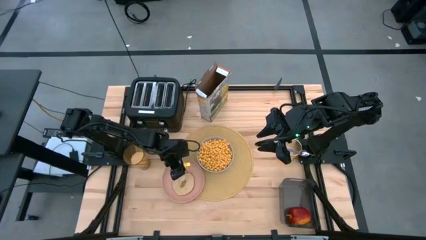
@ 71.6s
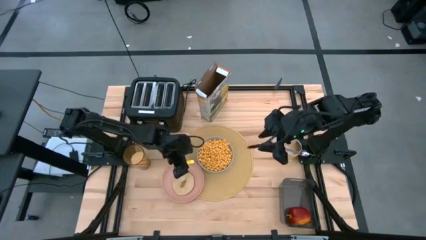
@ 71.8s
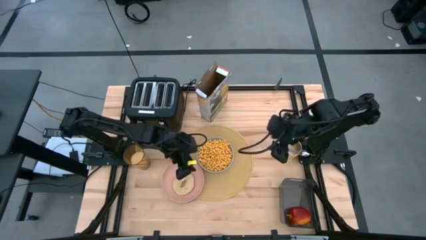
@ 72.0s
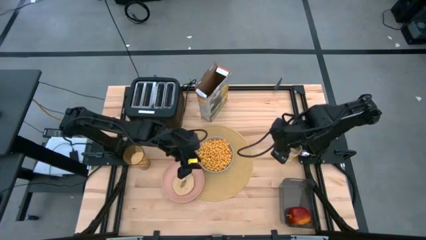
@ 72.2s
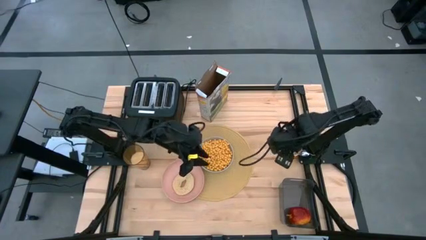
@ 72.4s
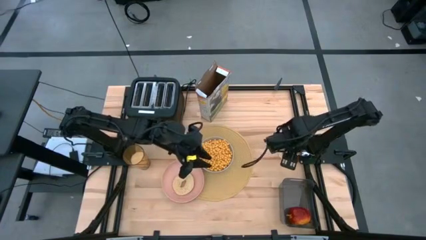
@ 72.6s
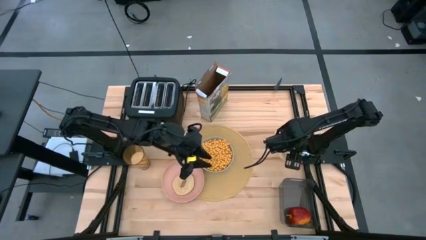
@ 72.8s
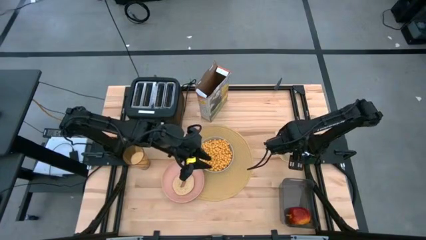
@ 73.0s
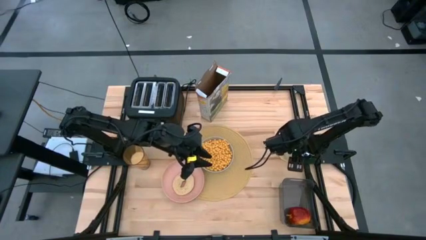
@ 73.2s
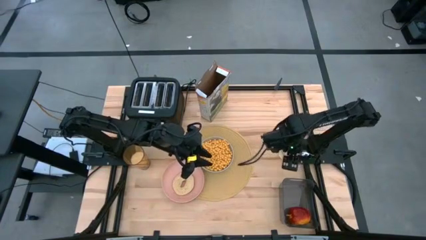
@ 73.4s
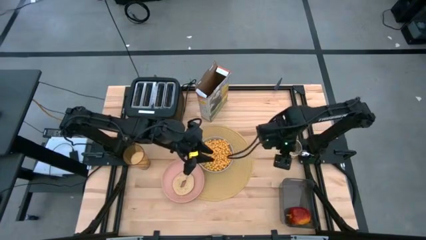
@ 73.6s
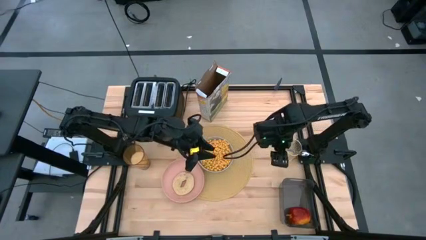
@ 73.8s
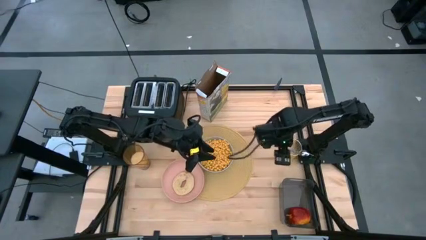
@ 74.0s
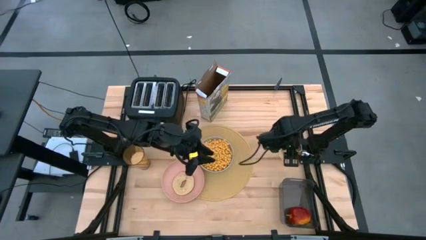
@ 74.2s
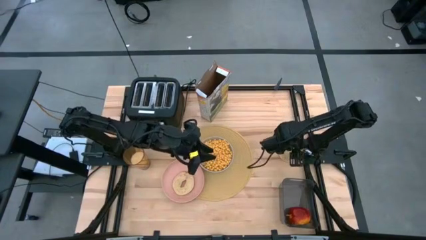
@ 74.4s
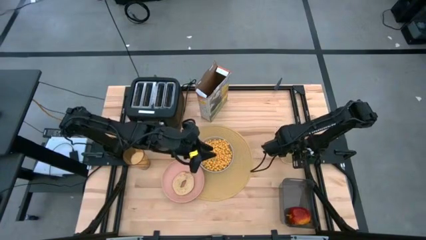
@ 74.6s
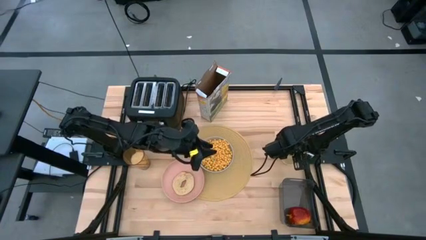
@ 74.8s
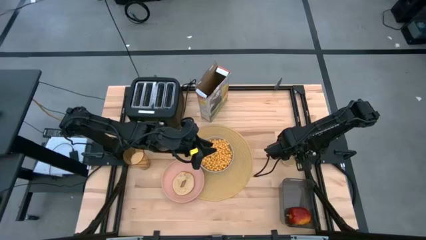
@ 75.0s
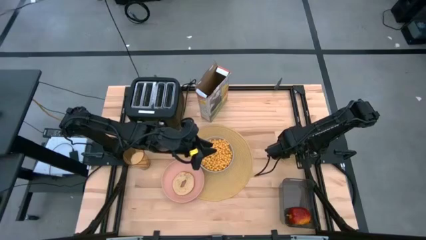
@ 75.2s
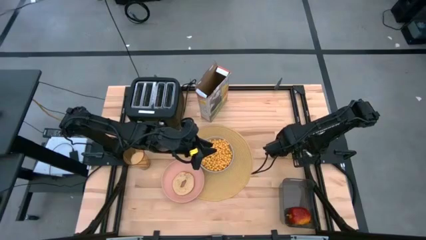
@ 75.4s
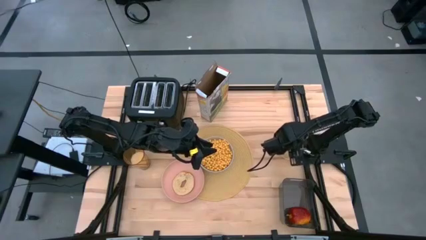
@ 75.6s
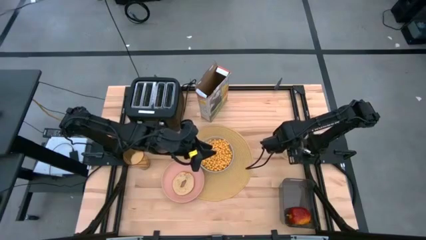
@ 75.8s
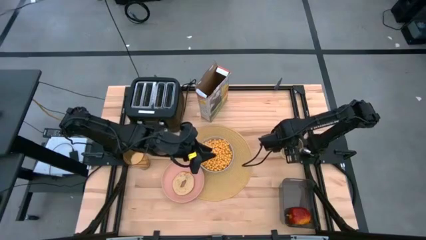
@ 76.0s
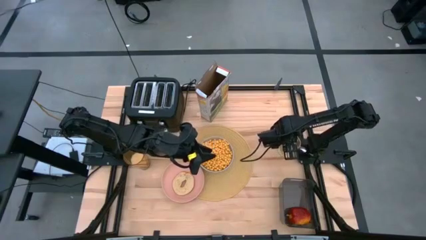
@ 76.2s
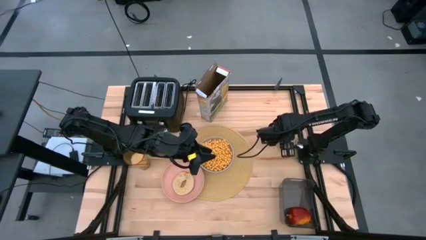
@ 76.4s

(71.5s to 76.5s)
Task: Arrange a breakfast setting
Adjust the gold silverware holder

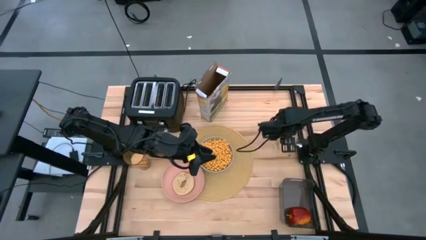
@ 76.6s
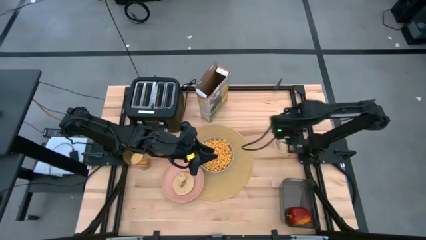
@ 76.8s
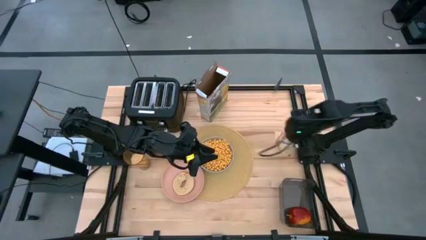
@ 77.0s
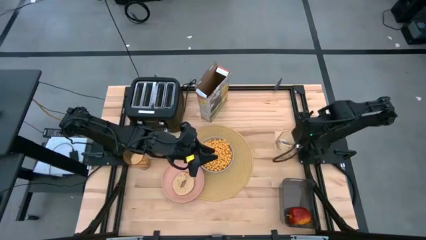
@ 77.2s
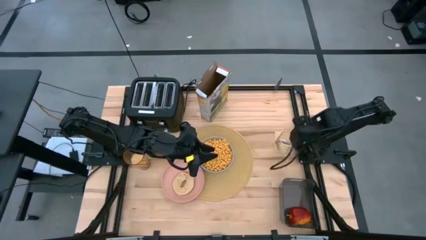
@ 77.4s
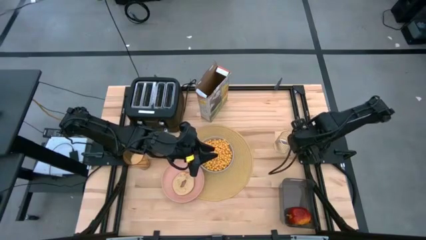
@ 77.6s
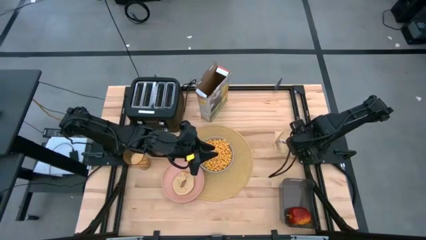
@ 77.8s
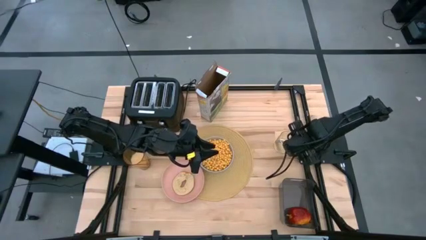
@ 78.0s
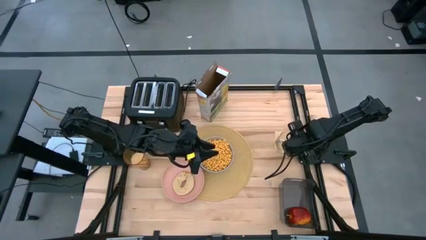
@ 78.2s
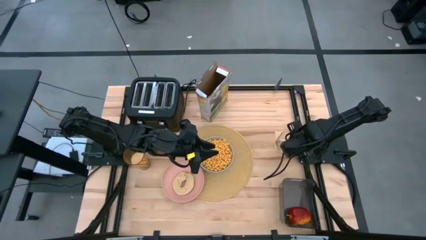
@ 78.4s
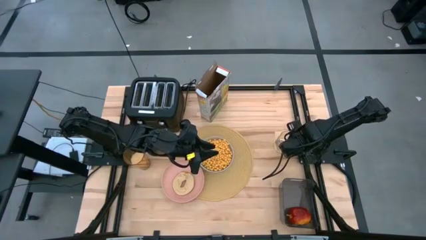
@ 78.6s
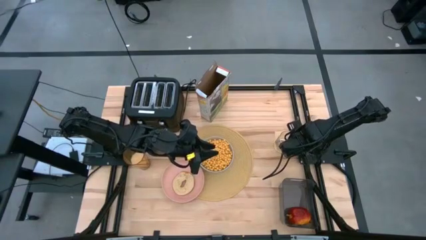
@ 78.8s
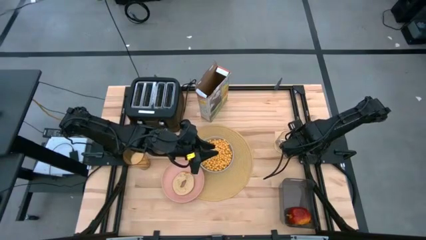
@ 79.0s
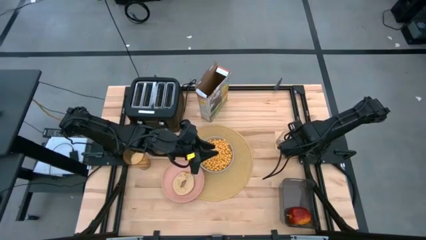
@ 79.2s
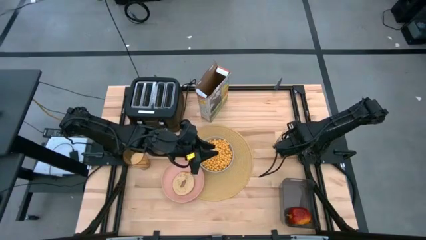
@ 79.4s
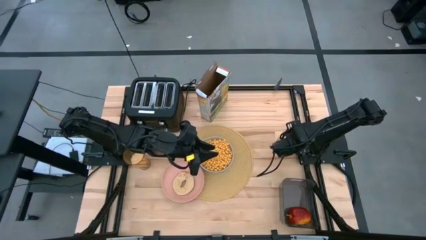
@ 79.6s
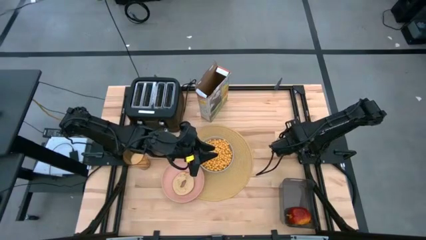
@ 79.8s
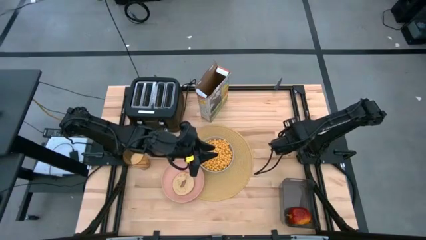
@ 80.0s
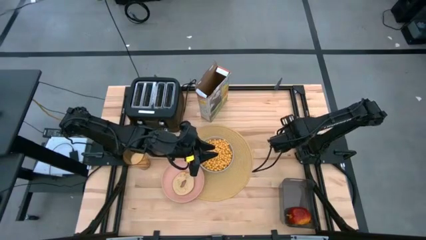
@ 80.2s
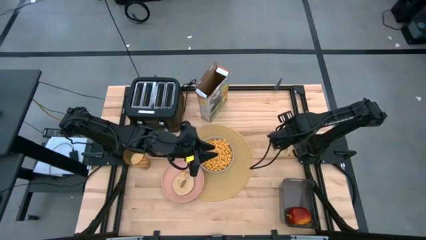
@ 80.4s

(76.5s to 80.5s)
Put the purple spoon on the brown placemat to the right of the gray bowl

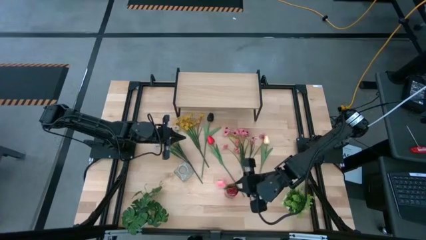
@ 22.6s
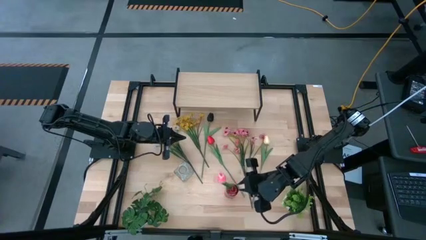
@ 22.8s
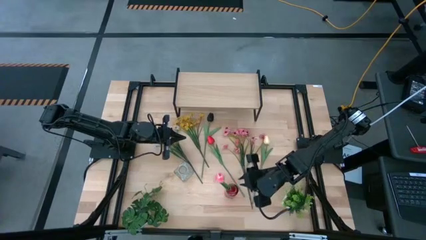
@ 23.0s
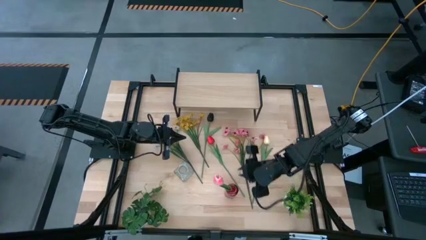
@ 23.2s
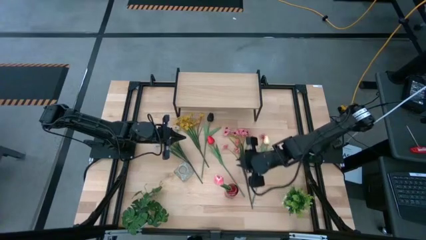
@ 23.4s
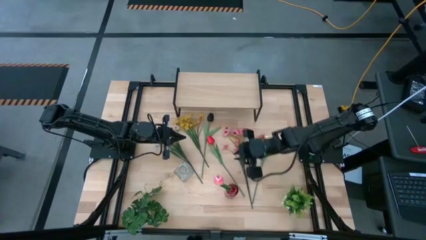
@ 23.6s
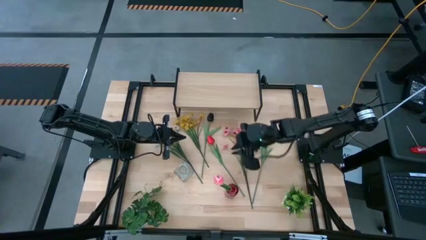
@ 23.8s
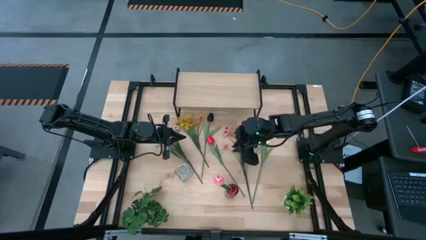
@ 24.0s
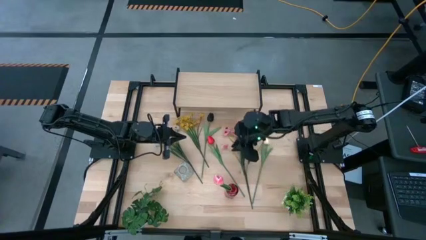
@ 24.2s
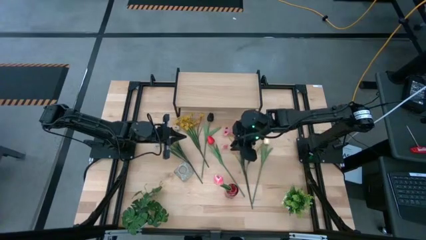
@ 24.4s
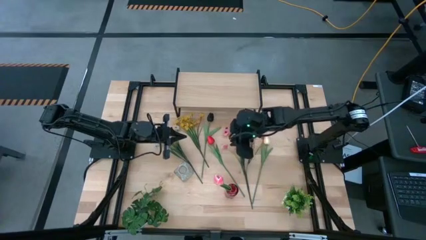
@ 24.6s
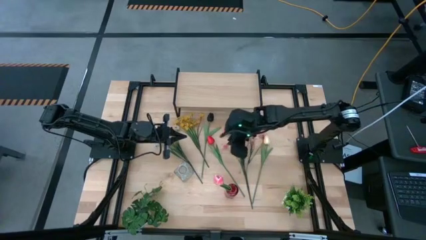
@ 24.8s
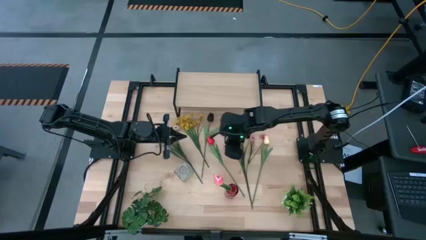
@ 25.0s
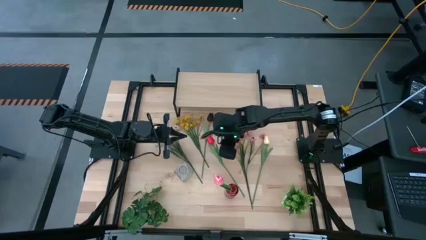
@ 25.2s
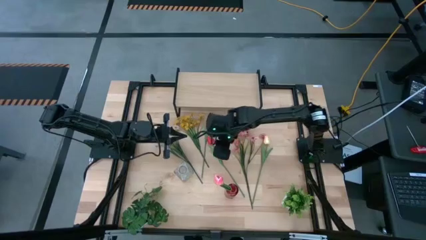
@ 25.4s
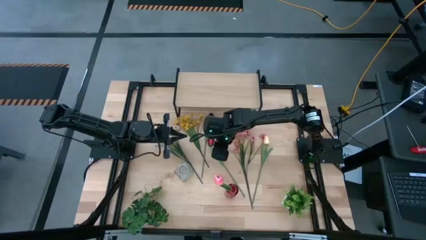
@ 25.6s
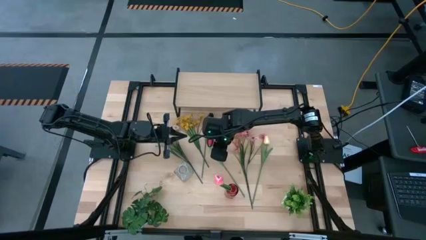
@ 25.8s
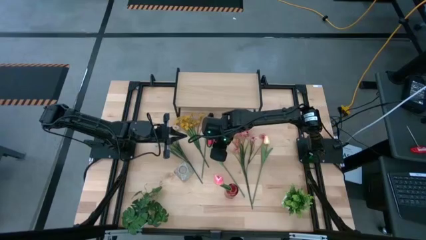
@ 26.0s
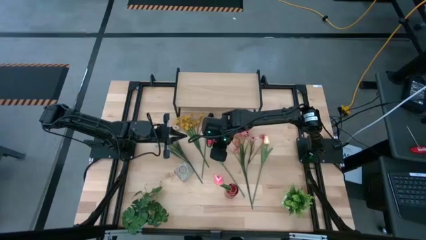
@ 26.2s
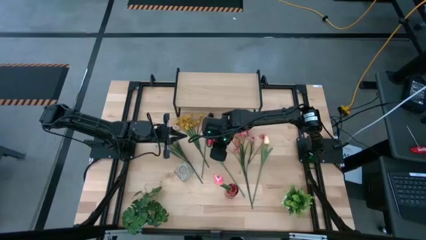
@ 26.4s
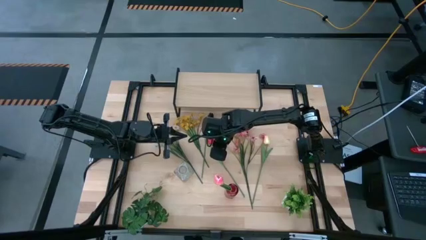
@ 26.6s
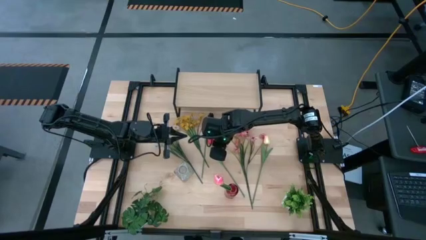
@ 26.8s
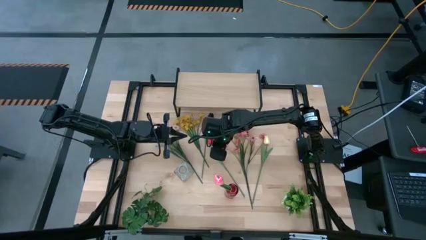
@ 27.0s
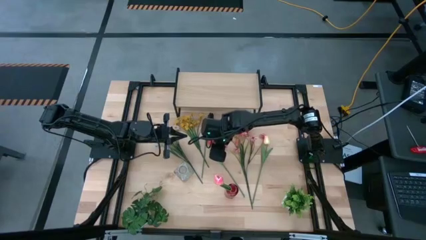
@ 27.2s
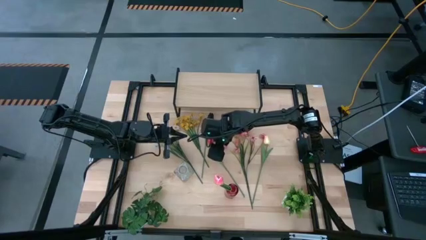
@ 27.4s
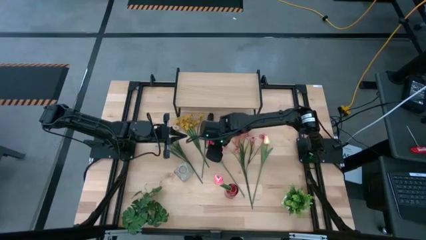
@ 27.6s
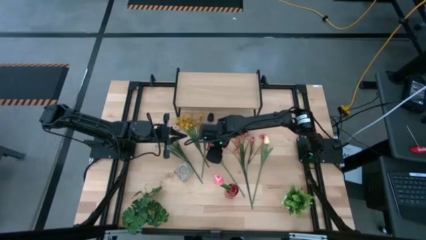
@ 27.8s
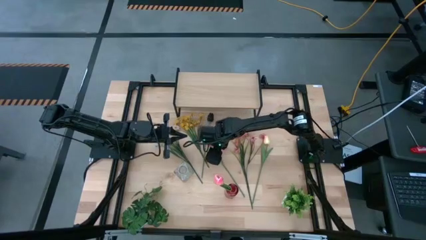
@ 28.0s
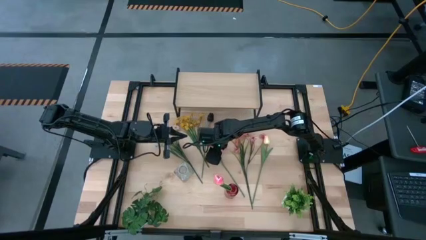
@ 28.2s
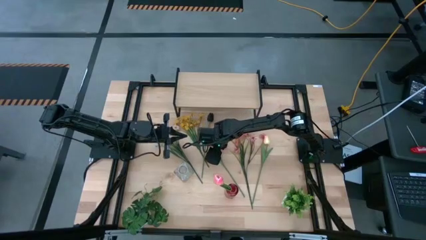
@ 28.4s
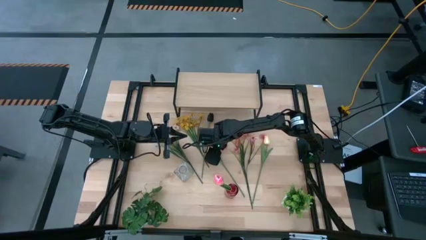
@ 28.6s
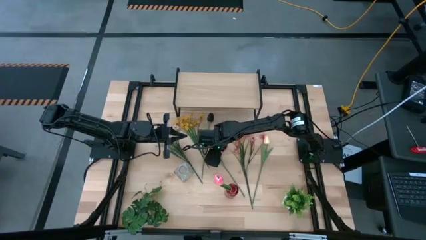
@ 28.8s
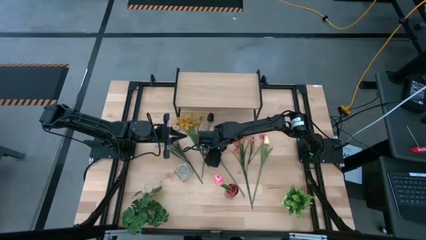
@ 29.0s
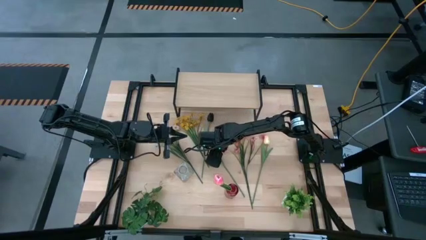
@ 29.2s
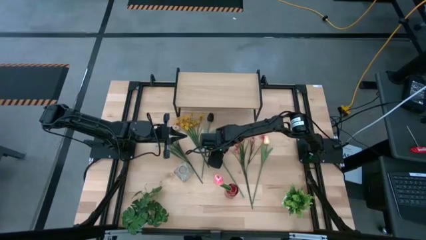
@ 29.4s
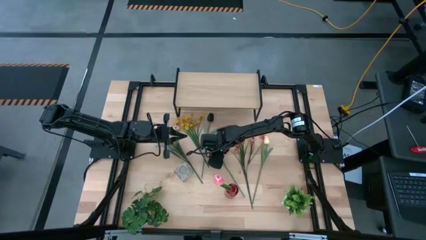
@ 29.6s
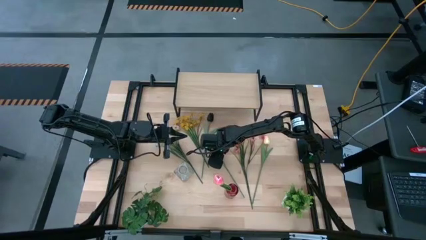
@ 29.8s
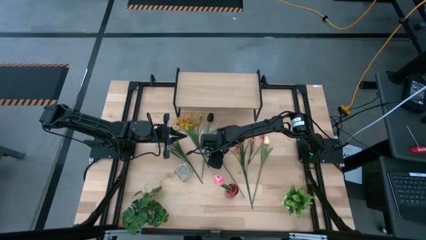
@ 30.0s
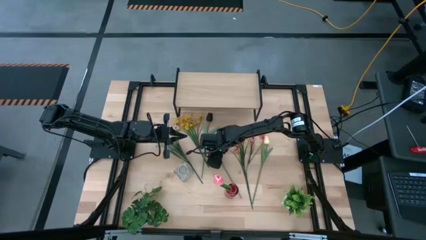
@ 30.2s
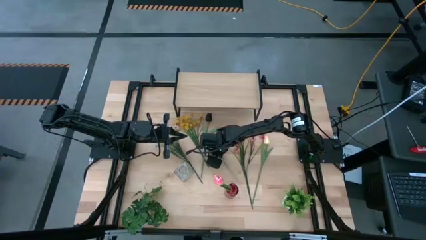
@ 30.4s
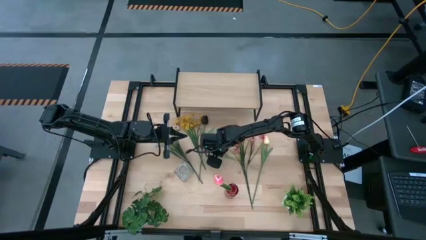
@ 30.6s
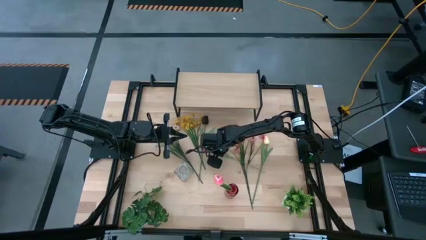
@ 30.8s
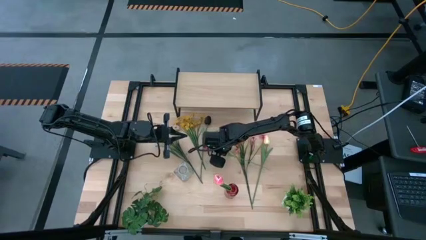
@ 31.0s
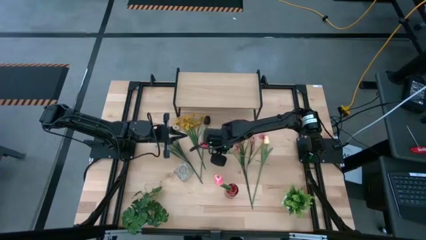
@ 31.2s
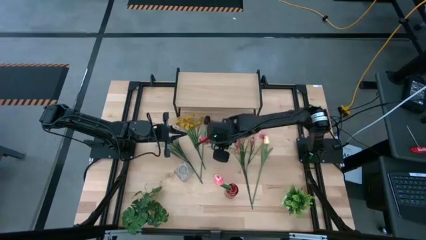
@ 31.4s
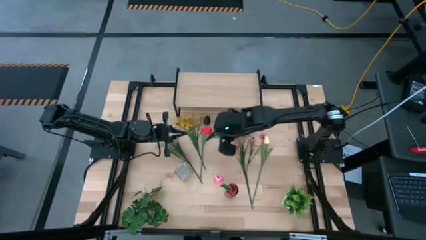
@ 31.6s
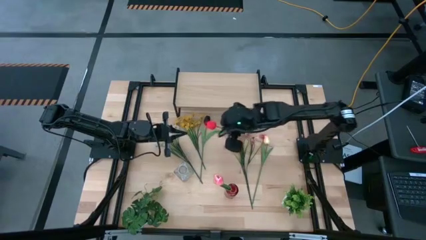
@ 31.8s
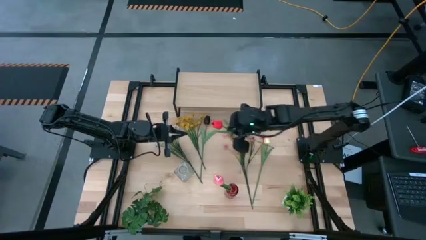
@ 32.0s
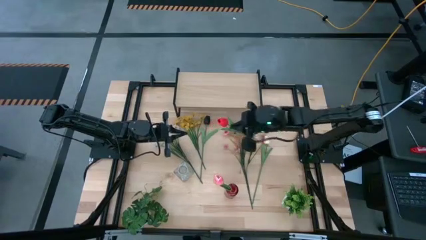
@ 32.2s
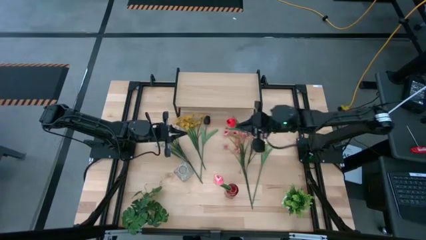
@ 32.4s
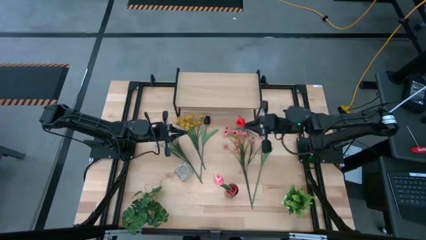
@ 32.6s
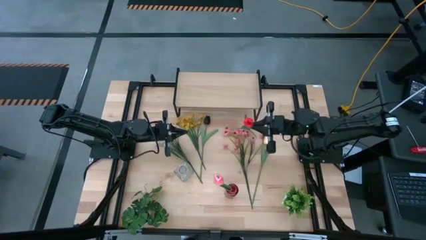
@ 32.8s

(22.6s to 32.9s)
Task: Pick and place flowers into a vace then onto a shelf
Put the red tulip into the red vase
